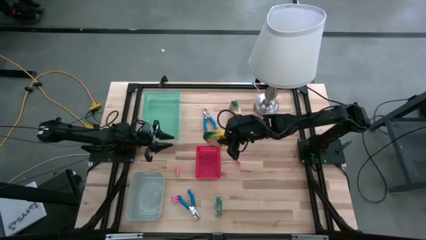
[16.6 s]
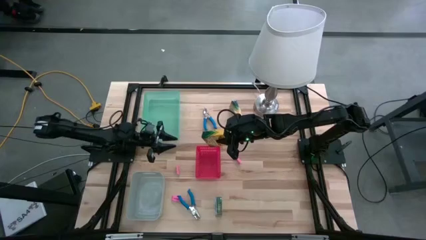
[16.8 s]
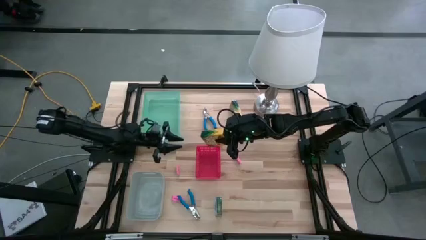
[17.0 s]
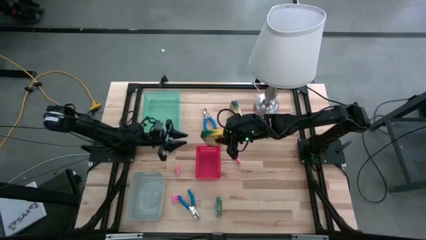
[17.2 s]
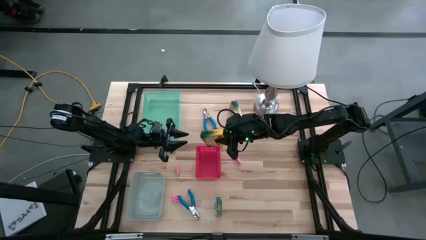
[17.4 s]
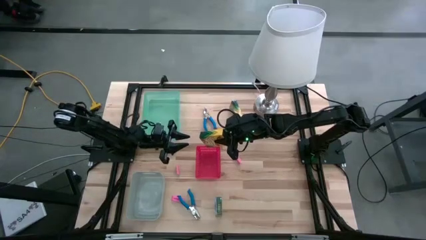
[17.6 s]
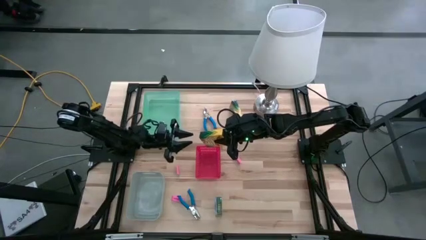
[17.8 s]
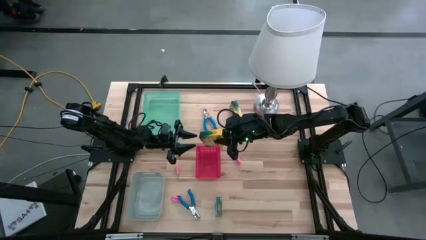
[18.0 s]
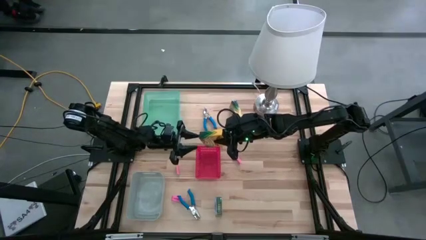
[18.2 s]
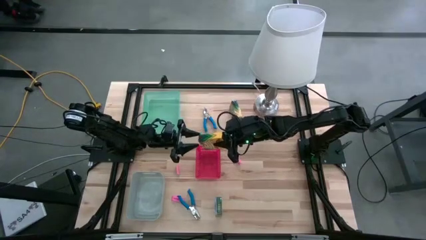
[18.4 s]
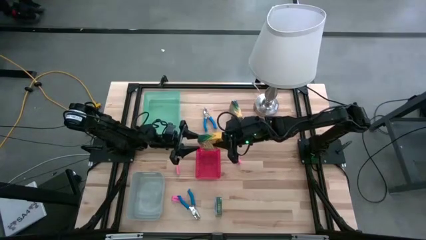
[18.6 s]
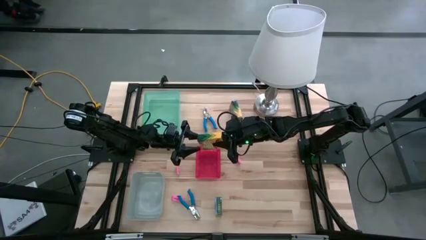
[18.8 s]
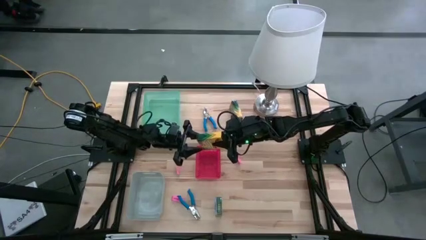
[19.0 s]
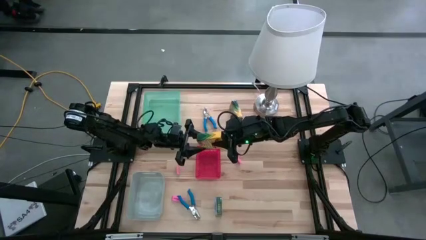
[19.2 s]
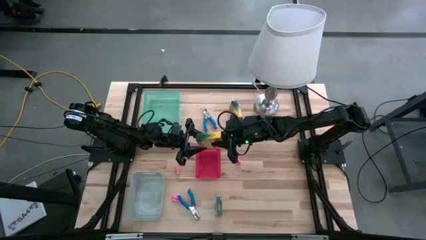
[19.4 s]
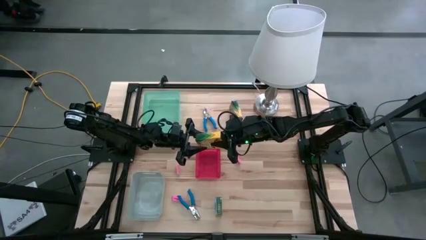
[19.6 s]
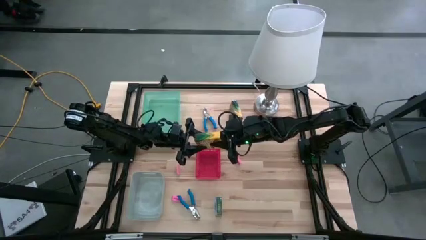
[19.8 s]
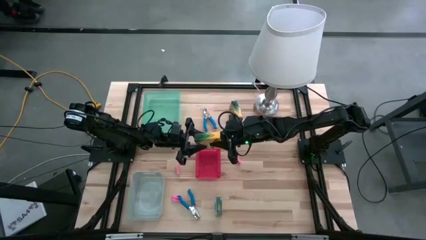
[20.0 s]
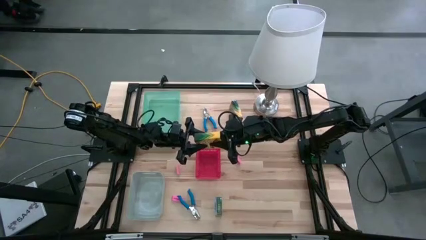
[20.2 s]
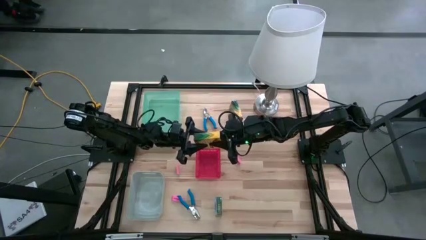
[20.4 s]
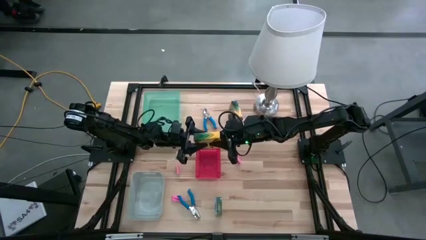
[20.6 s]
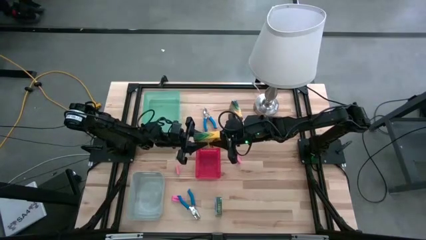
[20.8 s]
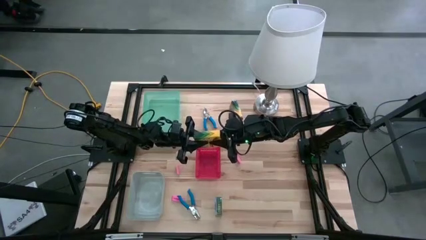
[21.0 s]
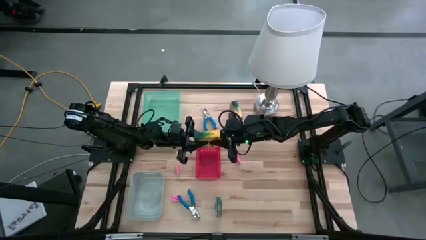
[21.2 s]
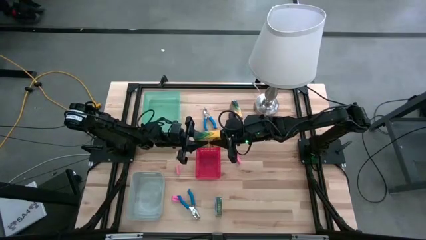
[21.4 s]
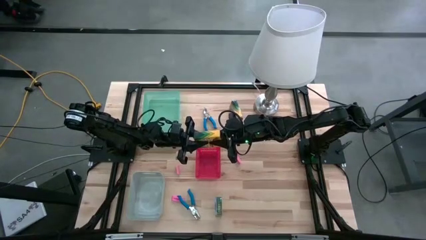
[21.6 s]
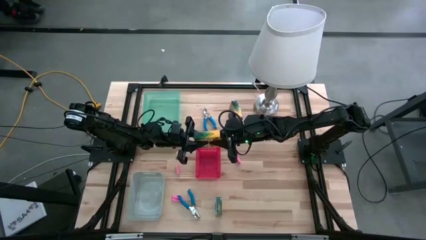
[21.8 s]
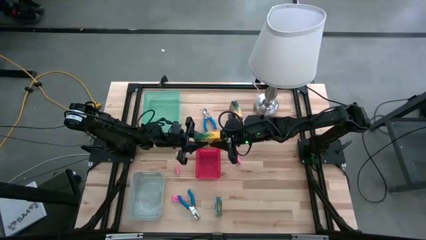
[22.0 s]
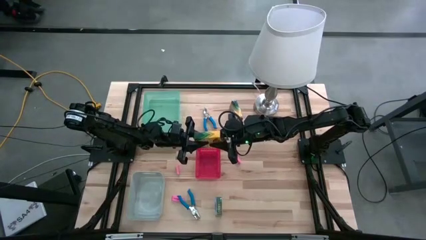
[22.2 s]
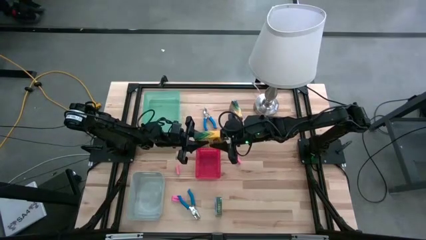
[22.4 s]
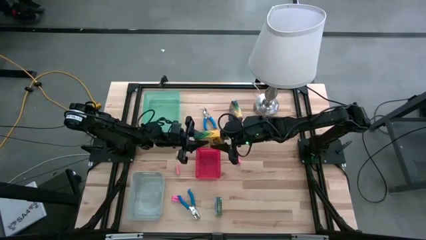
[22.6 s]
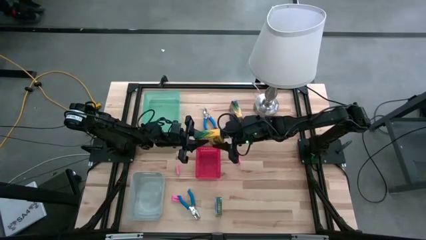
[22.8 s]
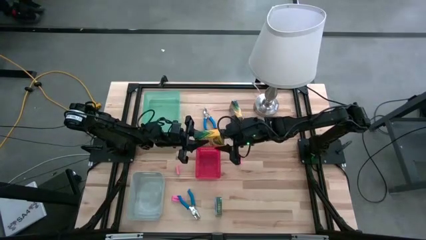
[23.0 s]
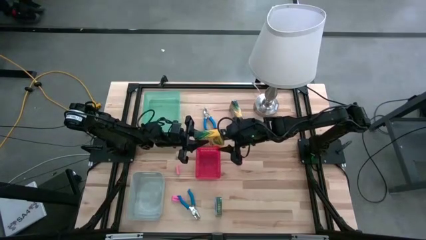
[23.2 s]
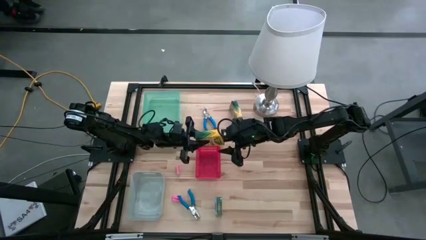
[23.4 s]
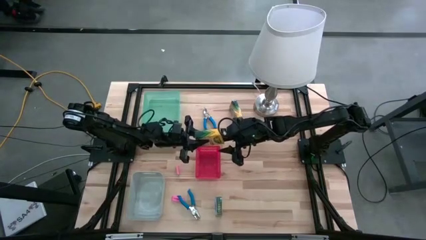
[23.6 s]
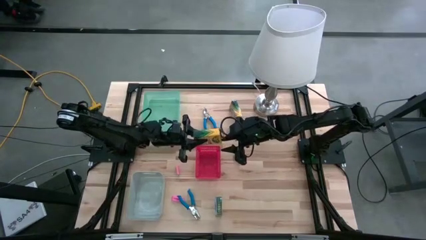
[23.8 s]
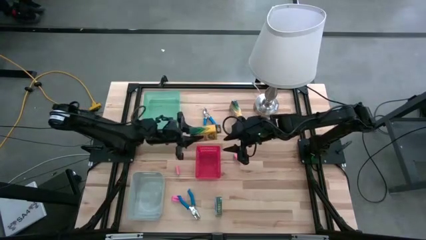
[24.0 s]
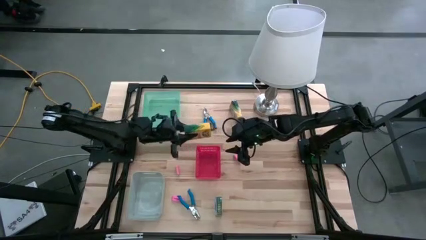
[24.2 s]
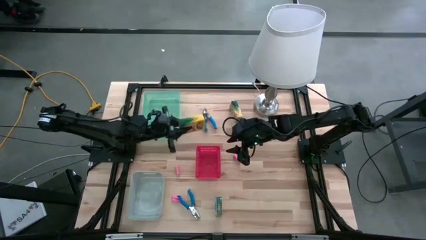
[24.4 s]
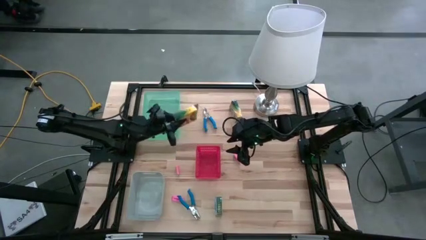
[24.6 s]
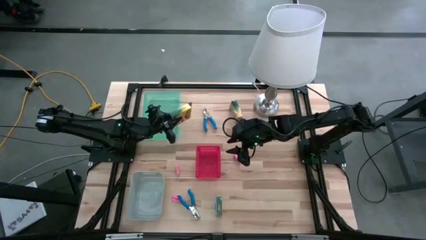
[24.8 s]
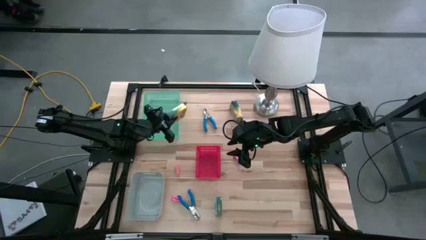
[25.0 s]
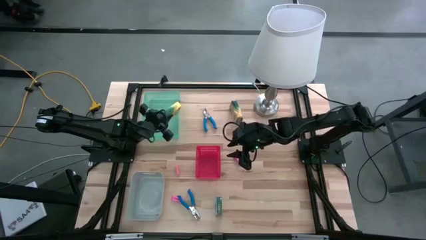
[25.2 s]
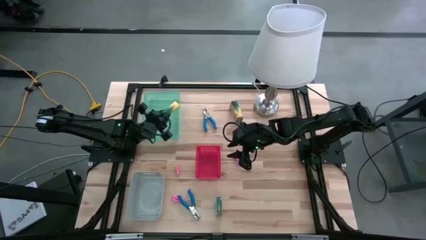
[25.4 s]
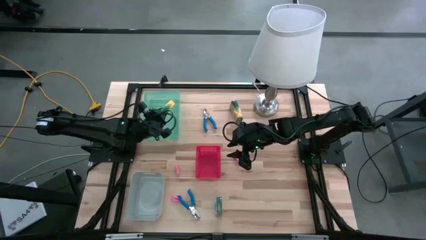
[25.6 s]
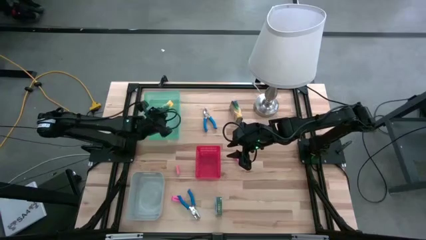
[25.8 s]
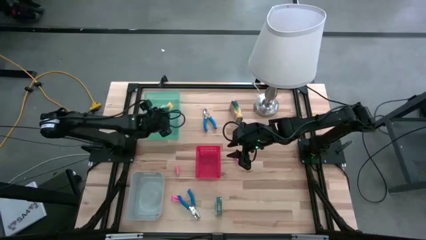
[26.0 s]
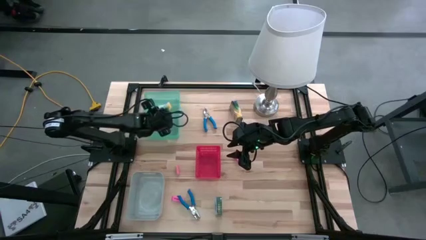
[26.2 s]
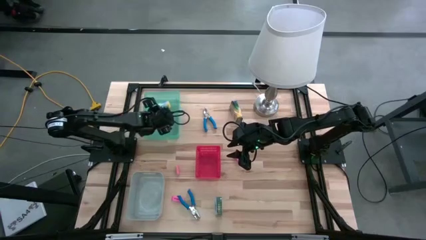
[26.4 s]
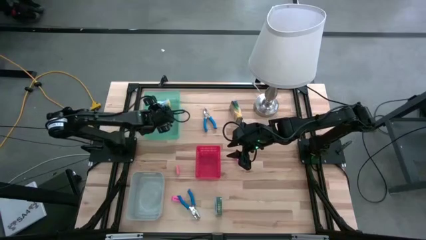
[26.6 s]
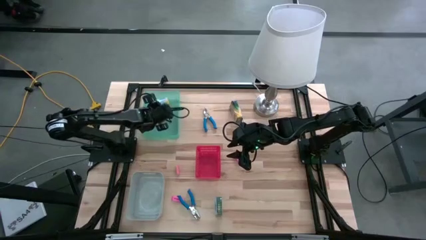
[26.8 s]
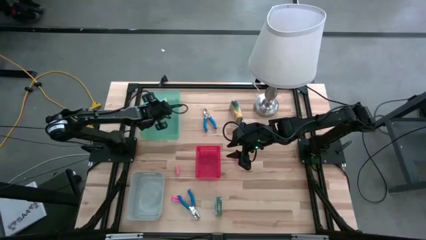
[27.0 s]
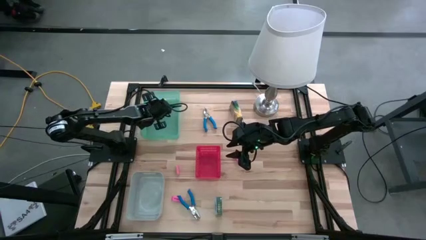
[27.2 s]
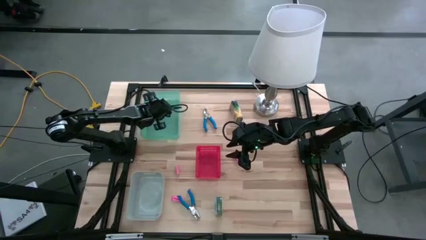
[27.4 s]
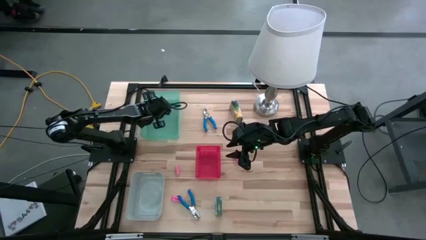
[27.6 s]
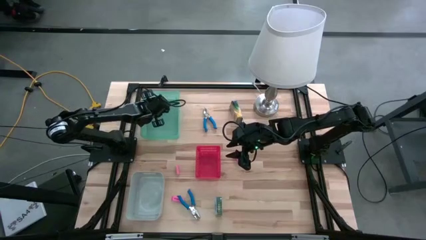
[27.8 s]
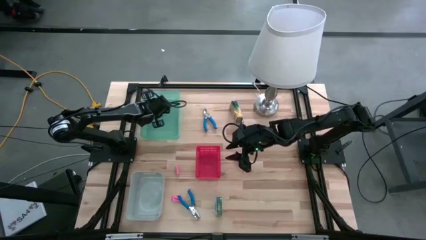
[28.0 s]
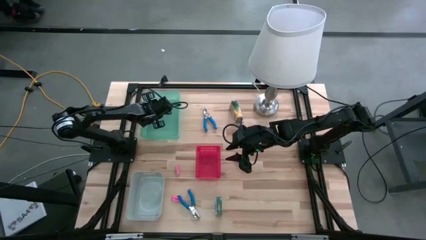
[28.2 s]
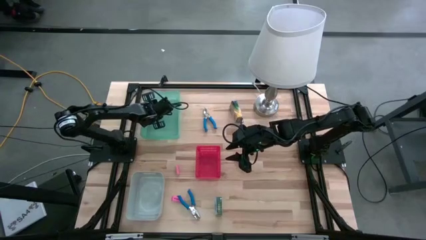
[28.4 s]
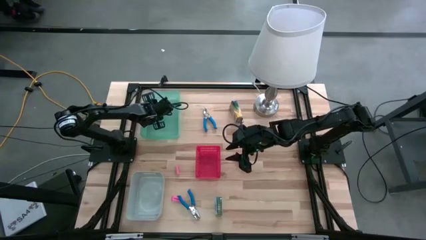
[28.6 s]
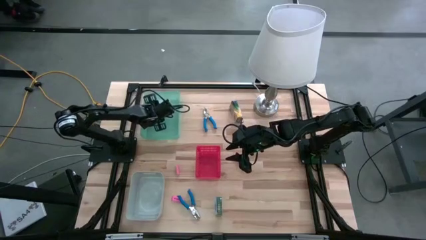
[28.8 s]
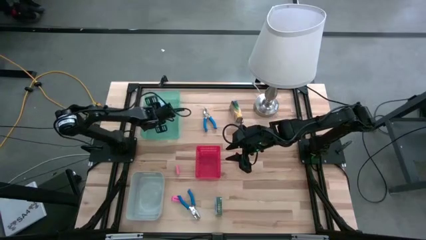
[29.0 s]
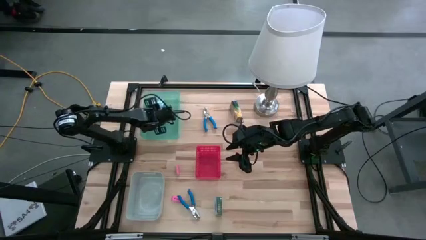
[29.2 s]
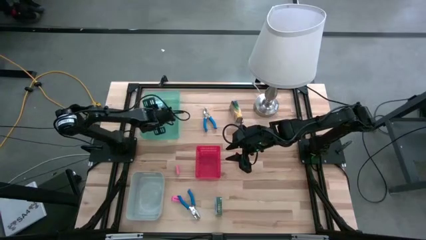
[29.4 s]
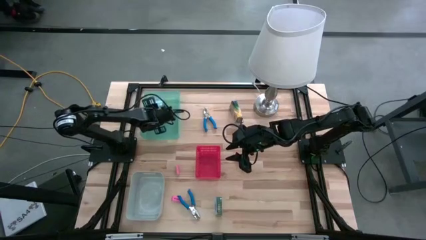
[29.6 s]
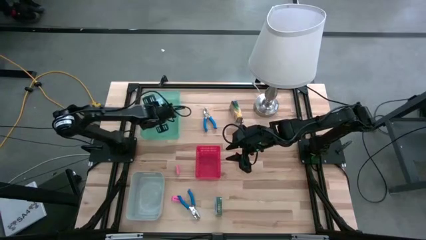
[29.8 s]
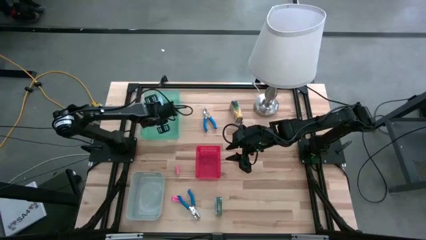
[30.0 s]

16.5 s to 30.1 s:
Task: Pick & Place School Supplies
Put the middle right yellow crayon box into the green bin

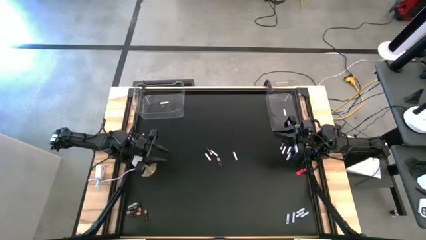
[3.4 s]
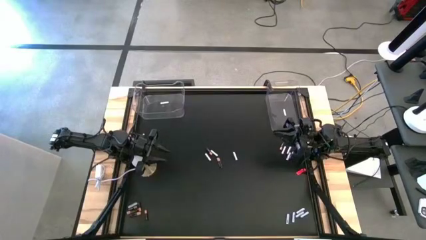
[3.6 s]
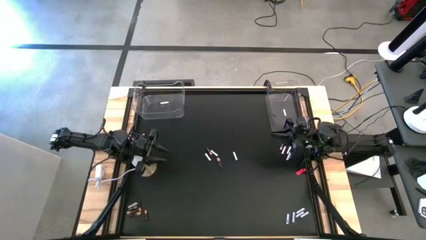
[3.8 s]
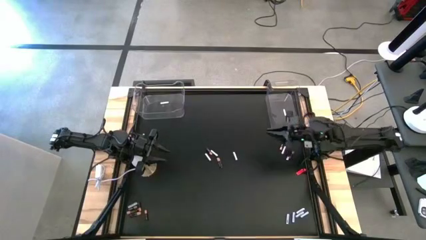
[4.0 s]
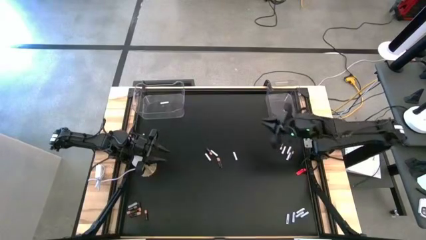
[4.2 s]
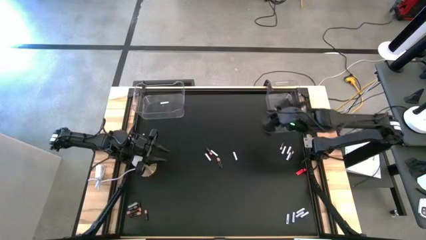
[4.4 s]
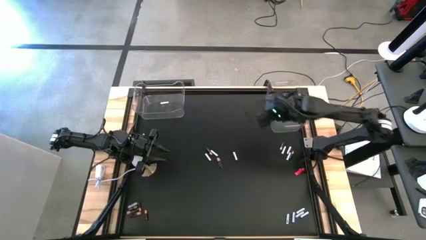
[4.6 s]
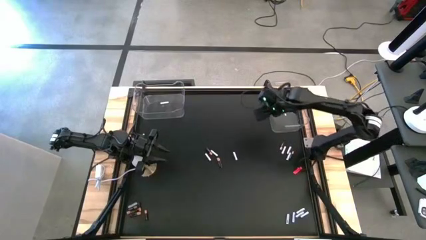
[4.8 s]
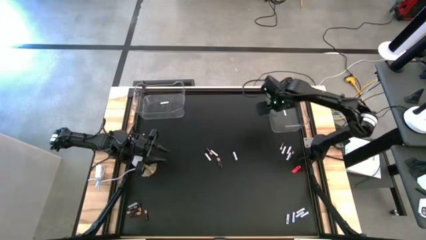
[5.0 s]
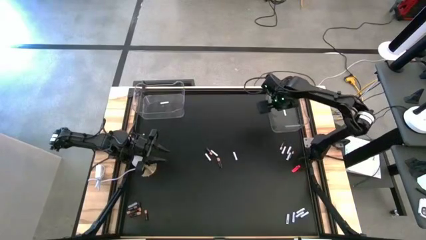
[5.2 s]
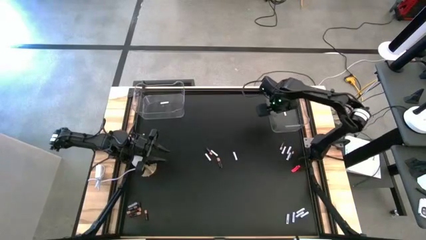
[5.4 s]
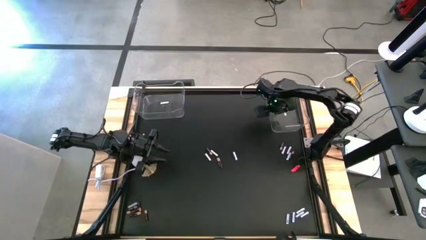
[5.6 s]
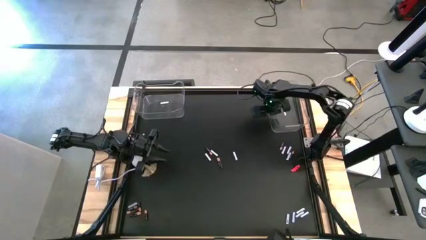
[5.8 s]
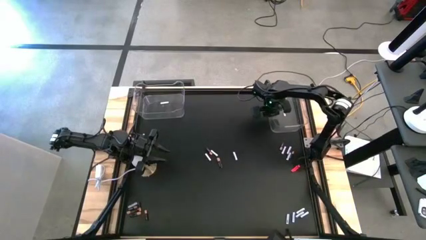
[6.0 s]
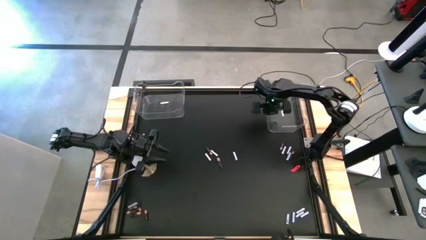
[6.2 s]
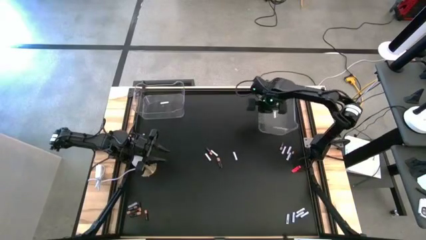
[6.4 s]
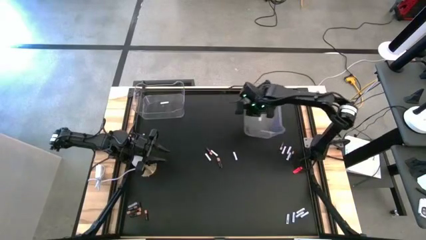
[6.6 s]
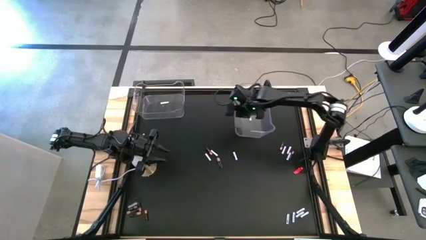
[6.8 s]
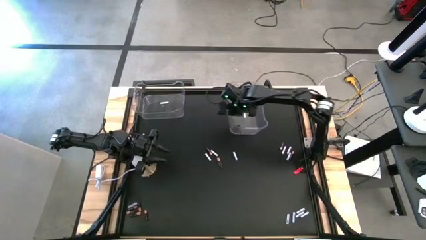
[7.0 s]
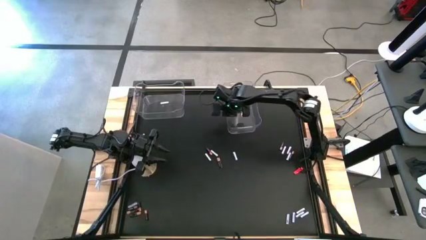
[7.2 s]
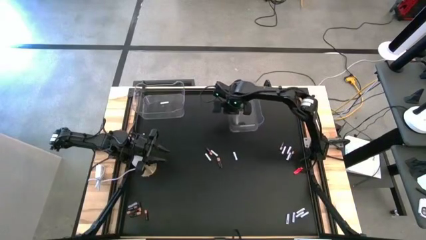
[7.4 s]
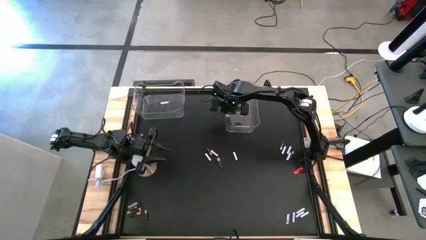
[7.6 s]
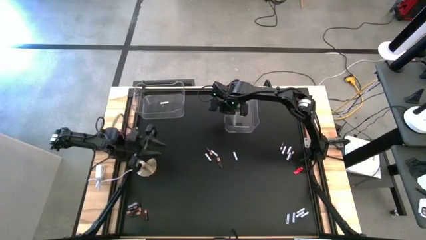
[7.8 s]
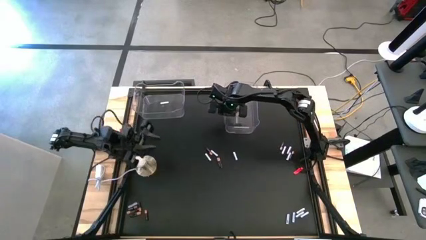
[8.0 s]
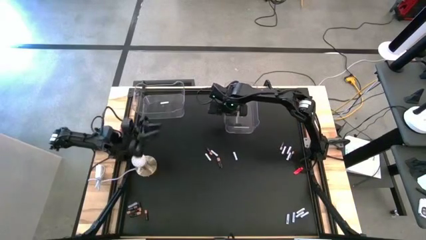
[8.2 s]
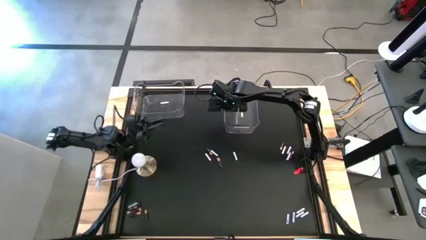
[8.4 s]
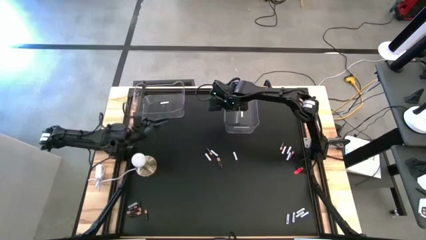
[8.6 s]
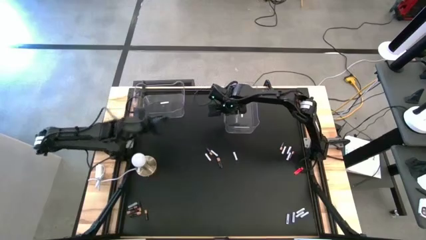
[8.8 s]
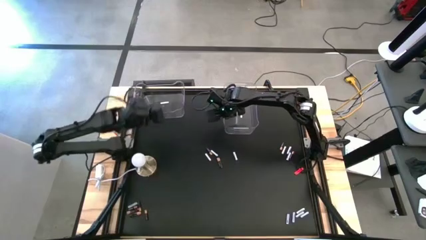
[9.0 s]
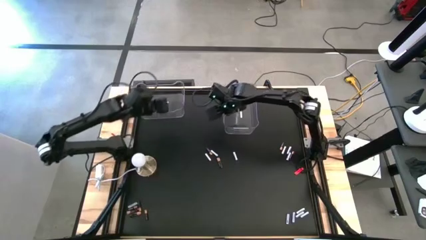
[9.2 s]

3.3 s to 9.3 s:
Task: Sort batteries
Move the right transparent bin to the top middle
